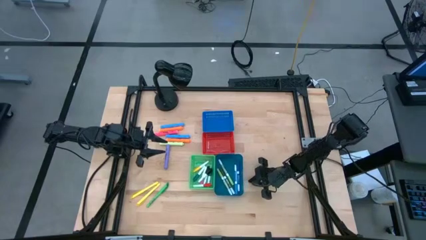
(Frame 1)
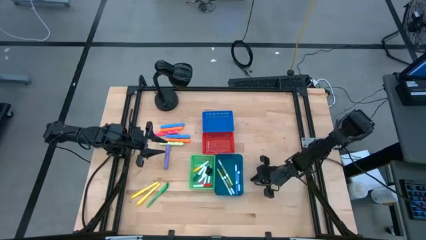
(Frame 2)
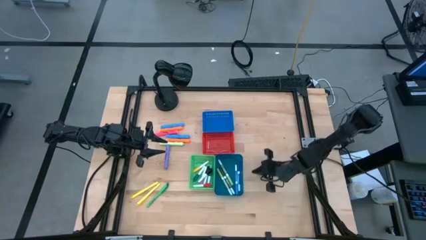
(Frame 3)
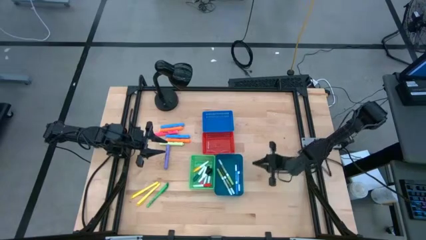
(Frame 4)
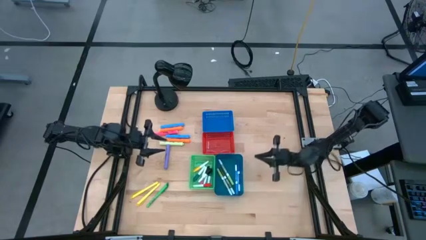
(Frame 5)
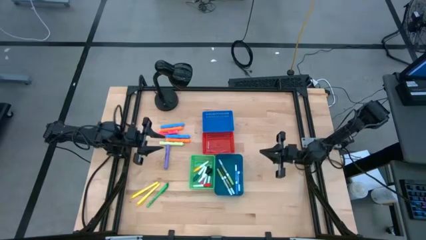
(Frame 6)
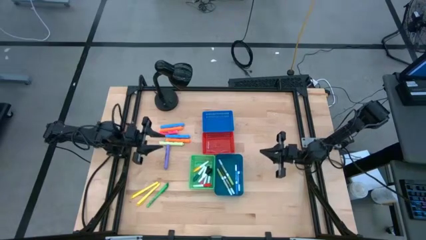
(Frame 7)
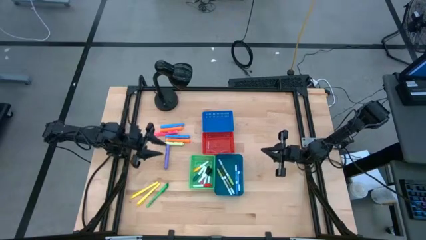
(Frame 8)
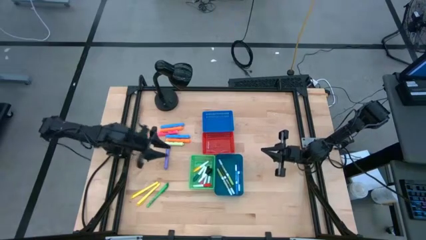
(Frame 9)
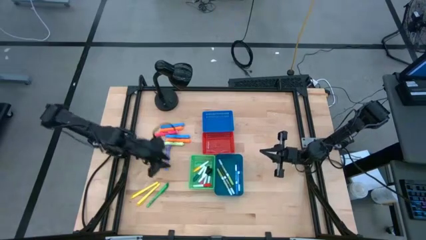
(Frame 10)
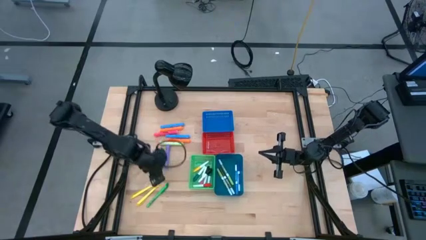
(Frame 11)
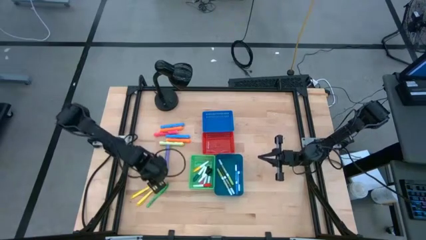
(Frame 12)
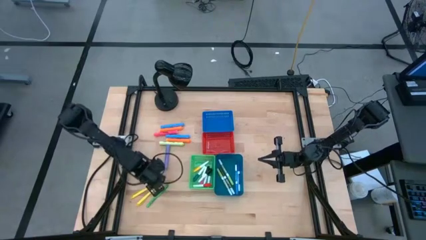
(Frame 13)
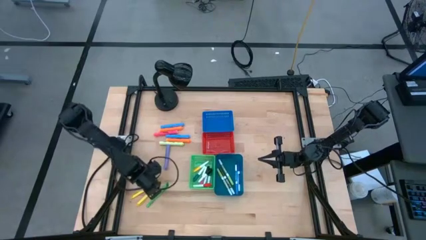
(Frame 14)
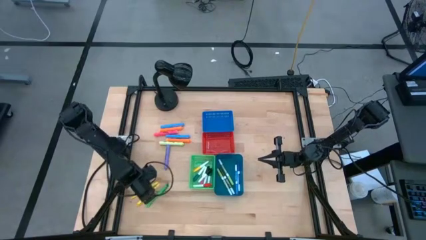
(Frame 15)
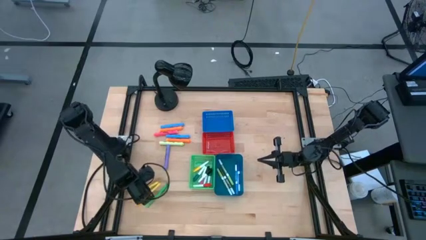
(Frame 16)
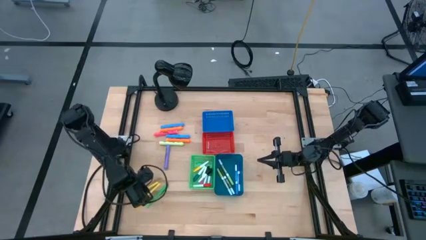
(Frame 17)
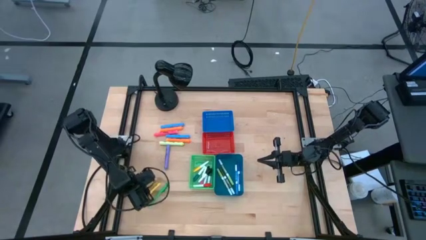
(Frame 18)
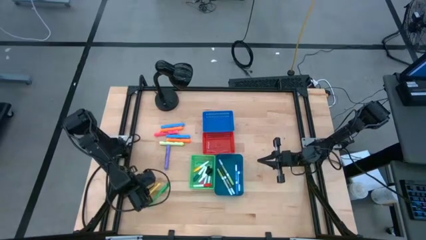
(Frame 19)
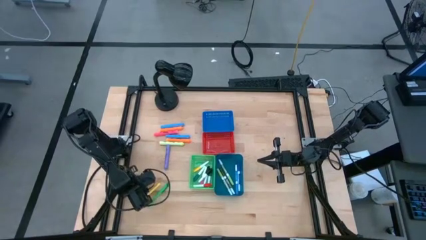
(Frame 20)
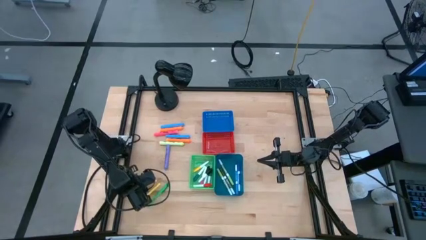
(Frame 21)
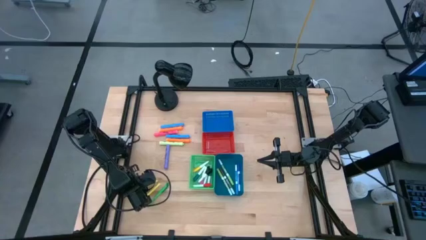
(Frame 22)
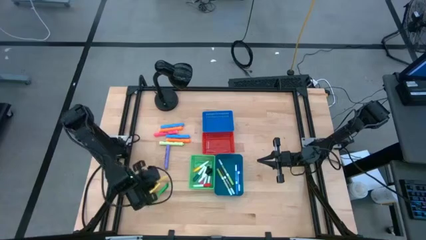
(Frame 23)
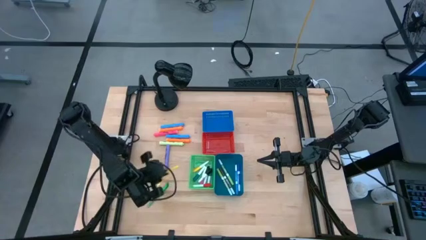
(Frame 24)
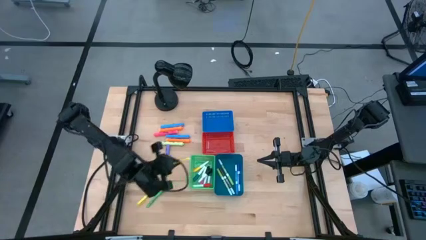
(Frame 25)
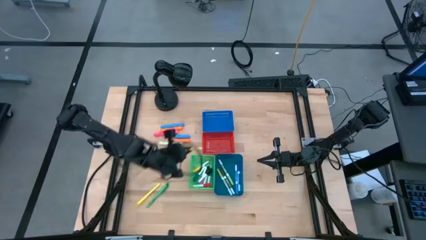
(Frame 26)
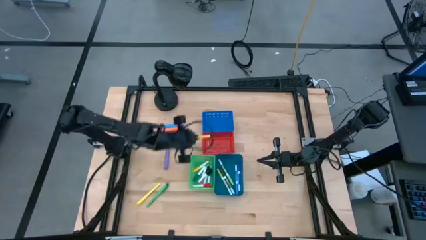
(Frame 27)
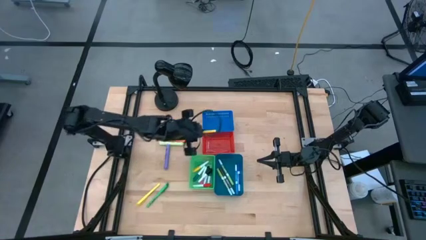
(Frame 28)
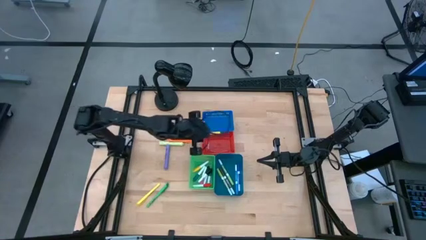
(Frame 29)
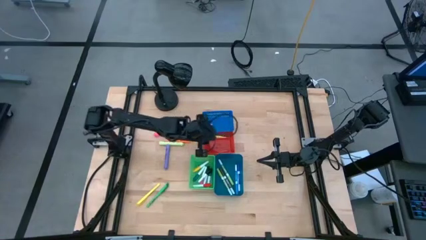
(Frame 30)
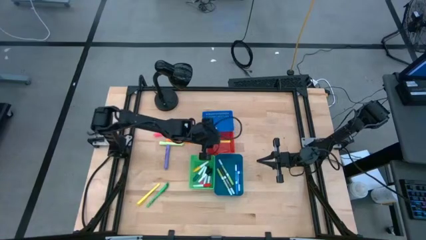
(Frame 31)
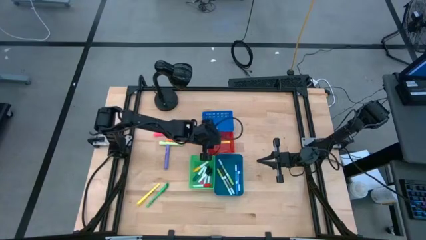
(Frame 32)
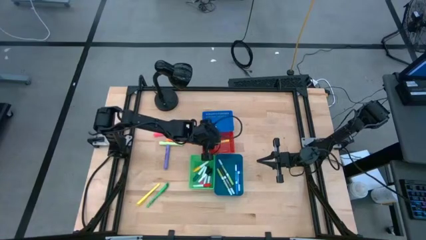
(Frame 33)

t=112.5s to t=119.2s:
Task: Pick & Place Markers
Put the left yellow pen into the red bin

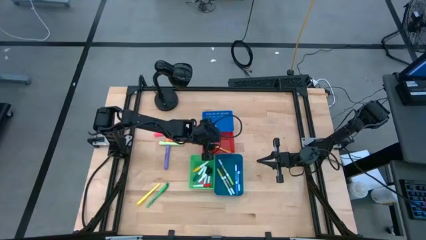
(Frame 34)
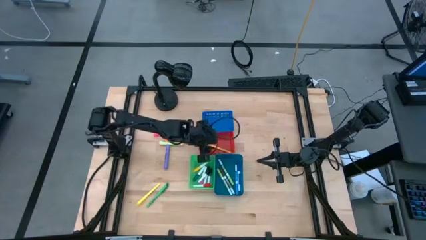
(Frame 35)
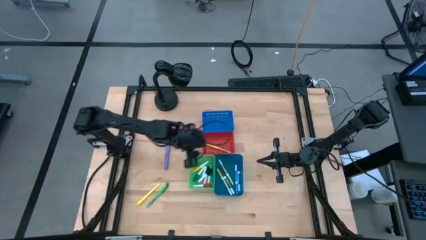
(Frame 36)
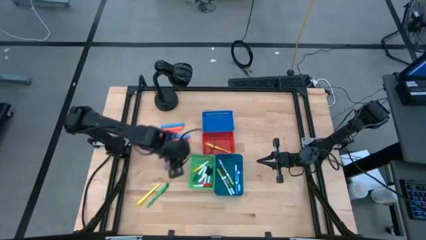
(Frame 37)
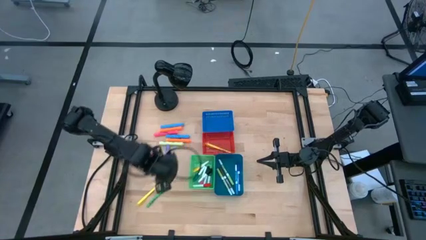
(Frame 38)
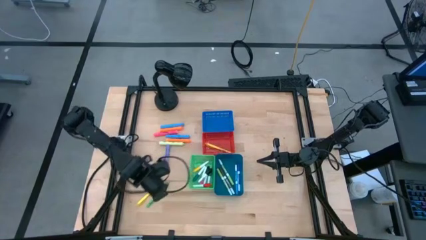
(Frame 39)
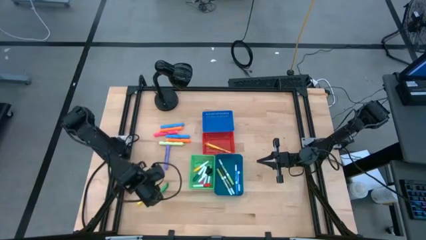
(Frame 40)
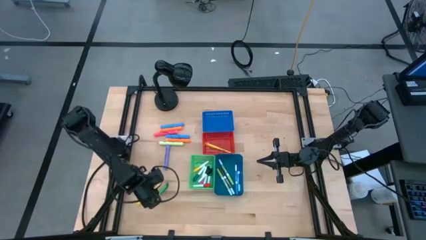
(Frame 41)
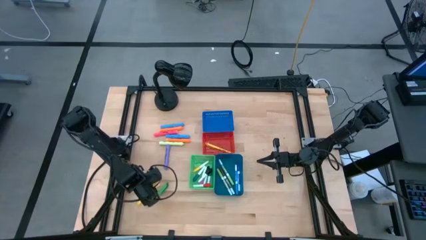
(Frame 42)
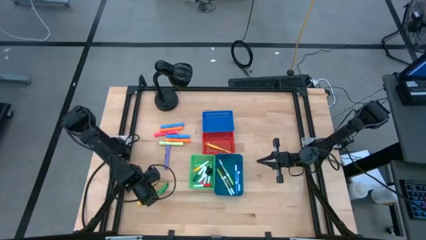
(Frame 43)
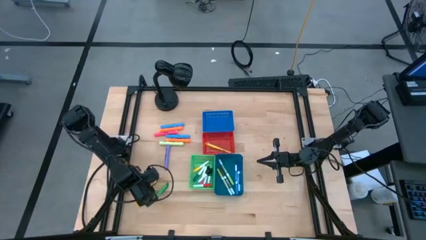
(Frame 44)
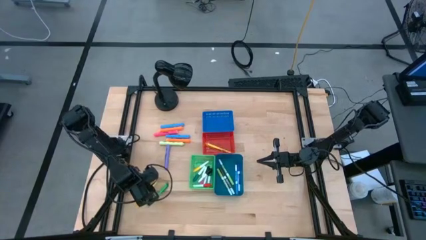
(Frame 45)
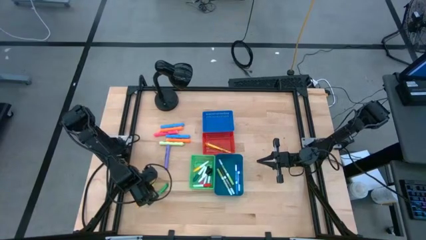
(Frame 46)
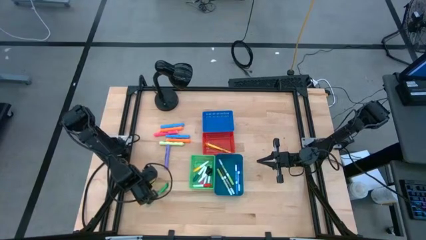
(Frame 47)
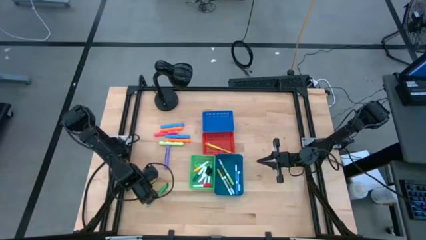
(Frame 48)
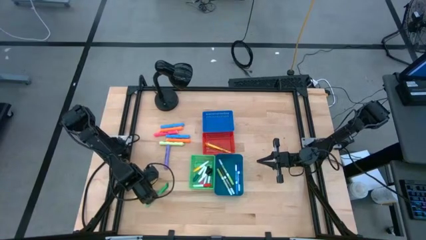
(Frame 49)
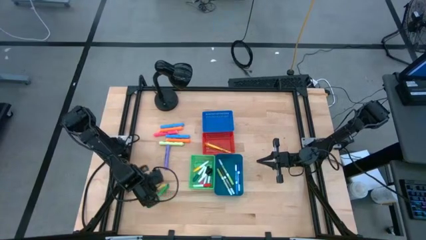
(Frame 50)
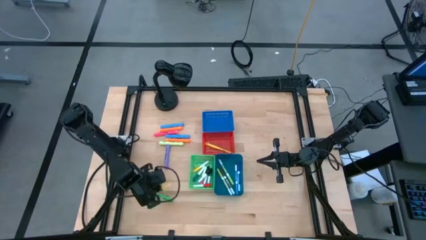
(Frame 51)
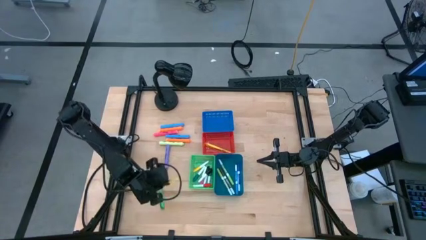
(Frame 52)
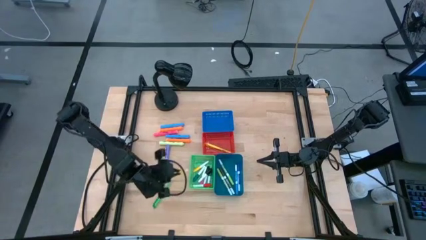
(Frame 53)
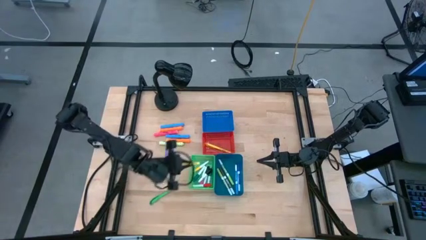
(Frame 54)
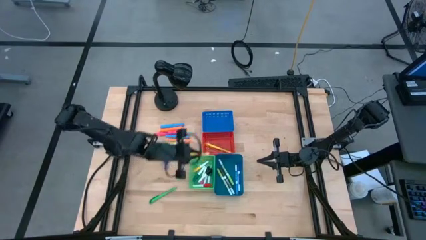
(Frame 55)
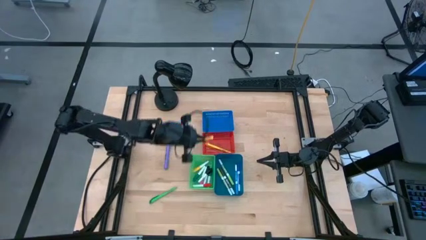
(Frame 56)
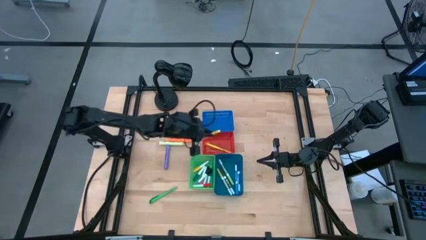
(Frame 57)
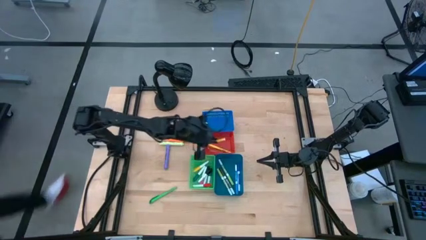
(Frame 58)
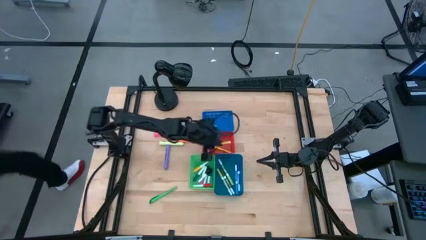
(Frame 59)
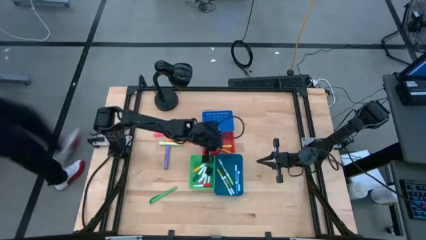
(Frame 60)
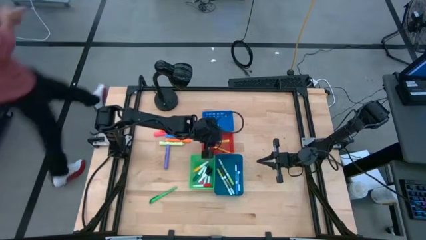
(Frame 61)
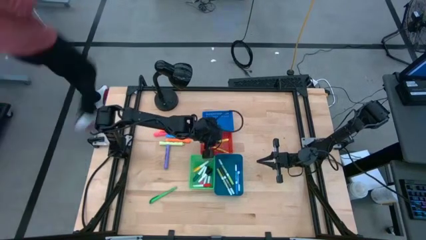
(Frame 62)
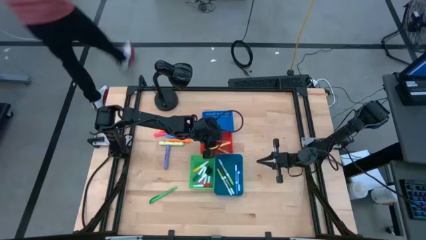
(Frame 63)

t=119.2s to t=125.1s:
Put the yellow pen into the red bin

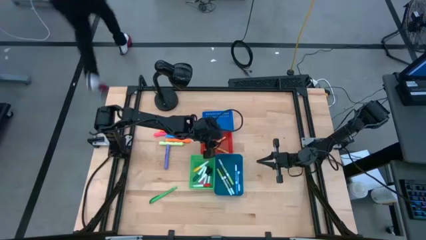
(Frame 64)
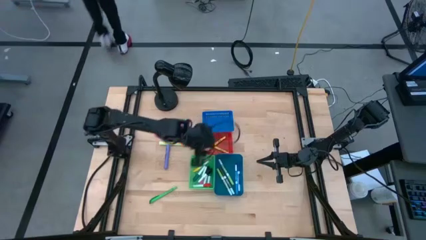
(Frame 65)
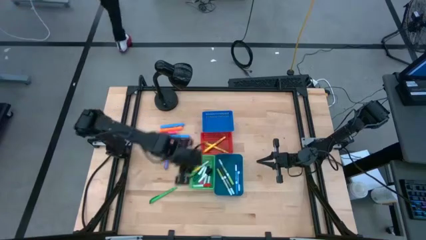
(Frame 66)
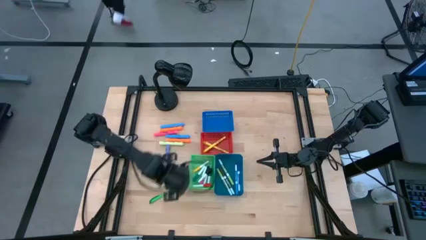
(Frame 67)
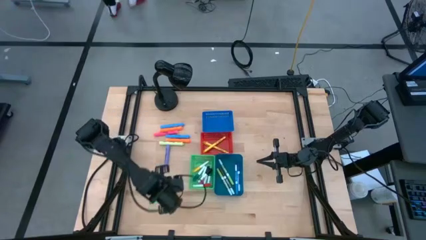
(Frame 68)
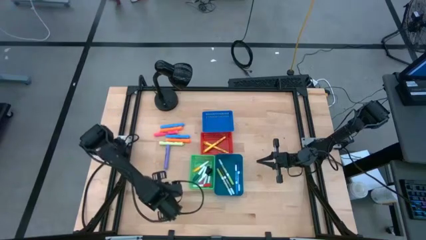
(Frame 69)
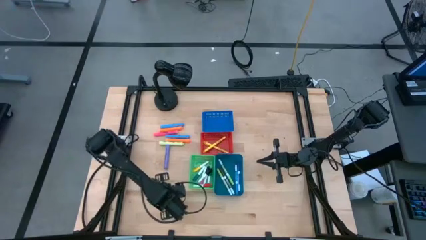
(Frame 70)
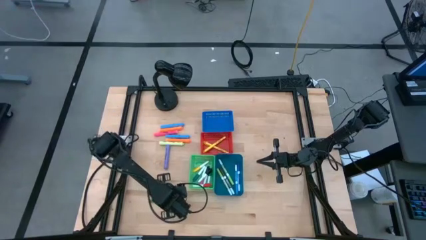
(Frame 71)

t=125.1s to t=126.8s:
Put the green pen into the red bin

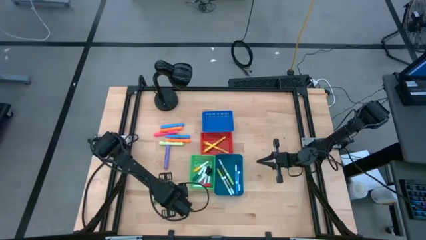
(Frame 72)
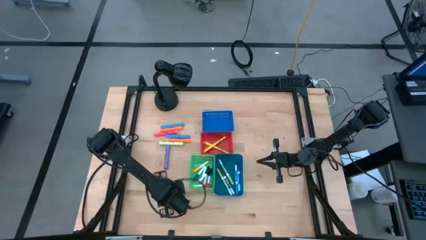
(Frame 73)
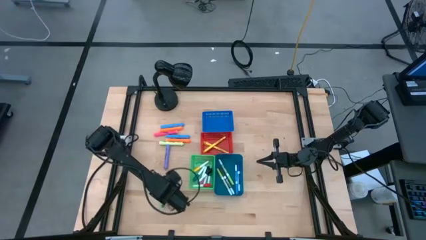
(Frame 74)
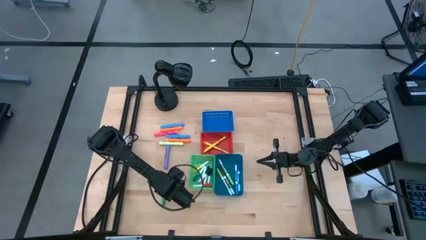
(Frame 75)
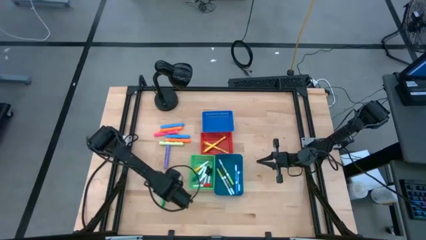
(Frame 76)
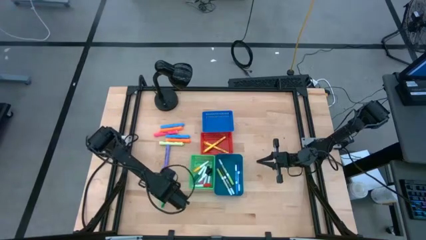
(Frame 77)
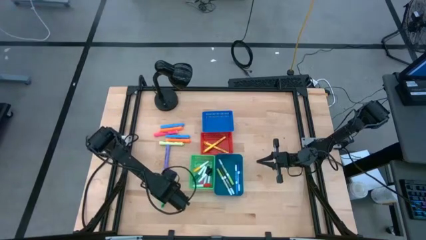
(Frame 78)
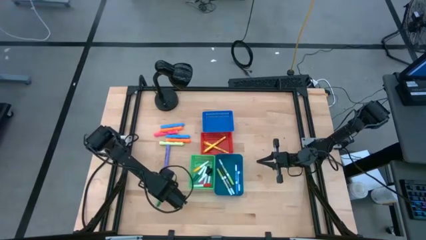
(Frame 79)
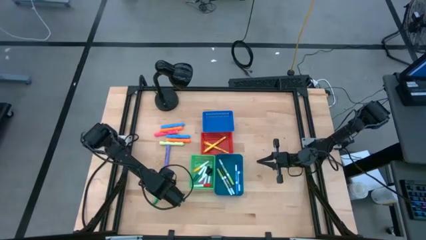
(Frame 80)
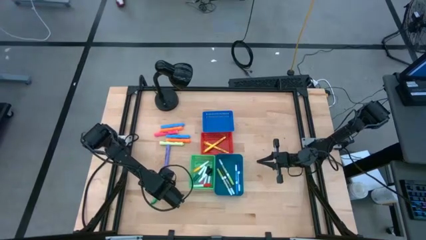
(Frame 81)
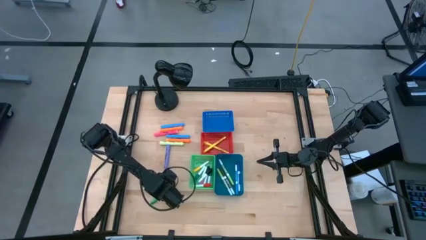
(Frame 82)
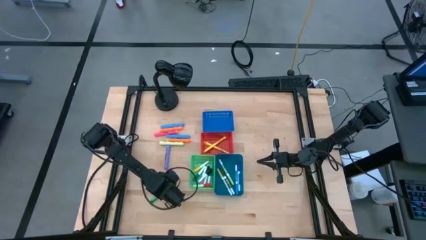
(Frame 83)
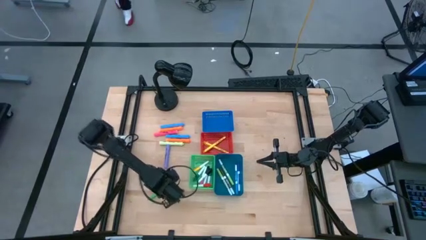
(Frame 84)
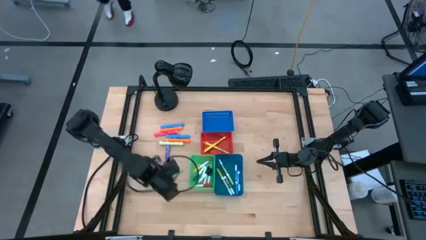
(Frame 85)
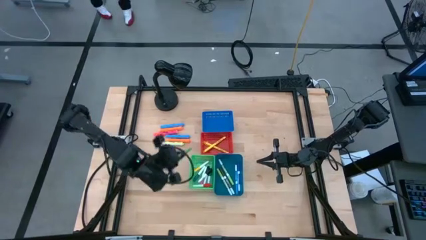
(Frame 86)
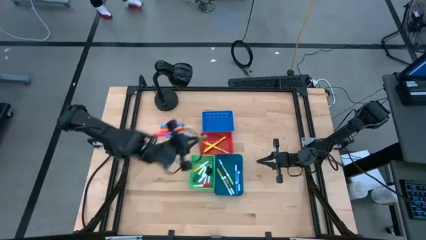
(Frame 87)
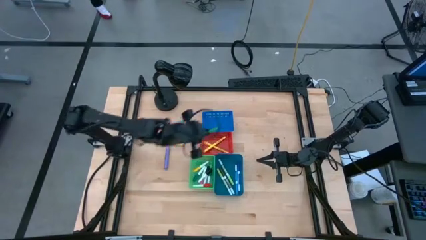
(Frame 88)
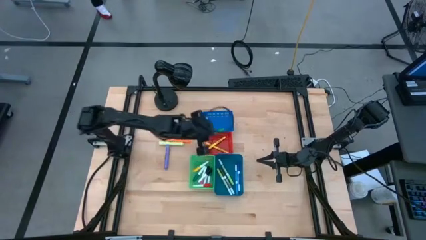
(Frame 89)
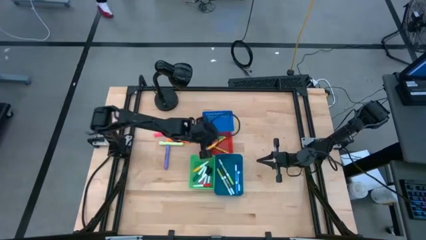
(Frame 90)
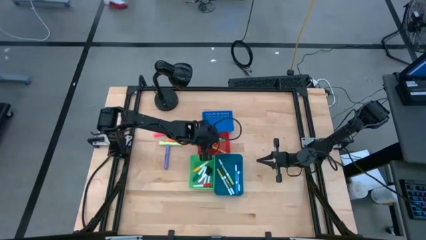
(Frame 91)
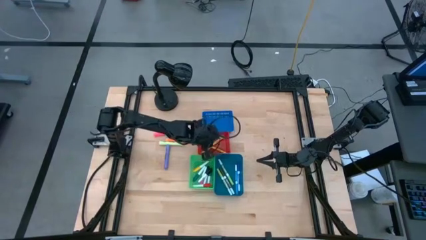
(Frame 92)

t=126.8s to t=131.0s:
Put the green pen into the red bin
